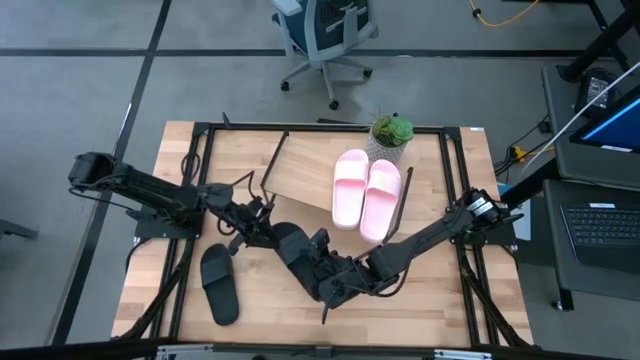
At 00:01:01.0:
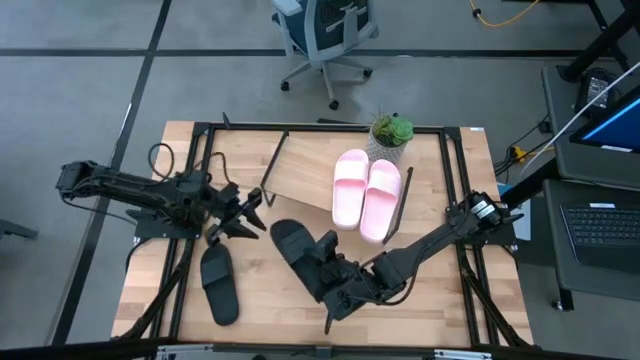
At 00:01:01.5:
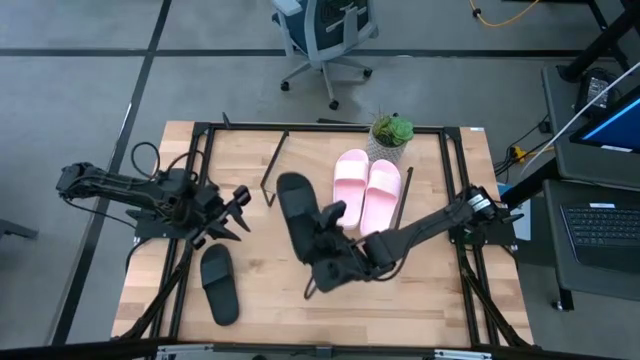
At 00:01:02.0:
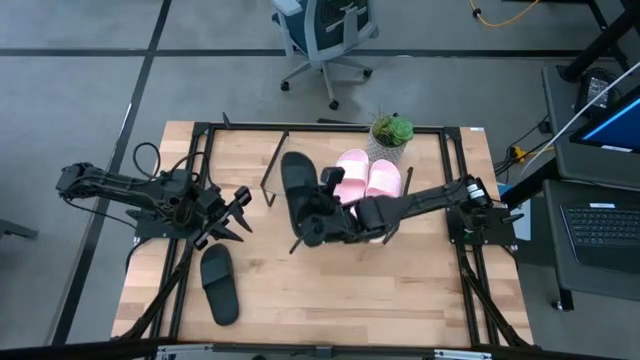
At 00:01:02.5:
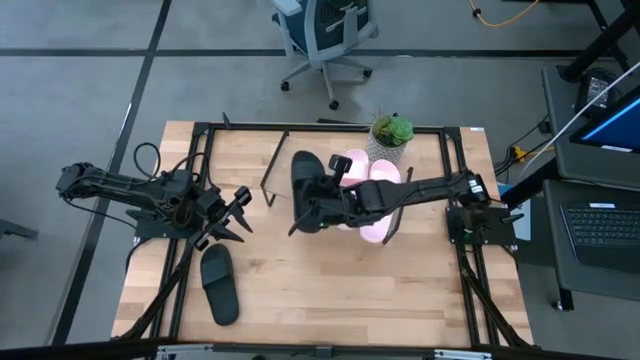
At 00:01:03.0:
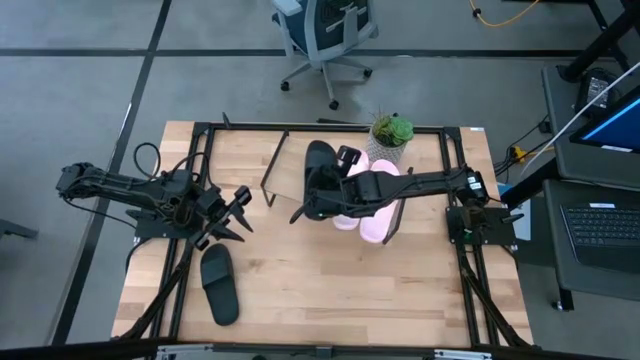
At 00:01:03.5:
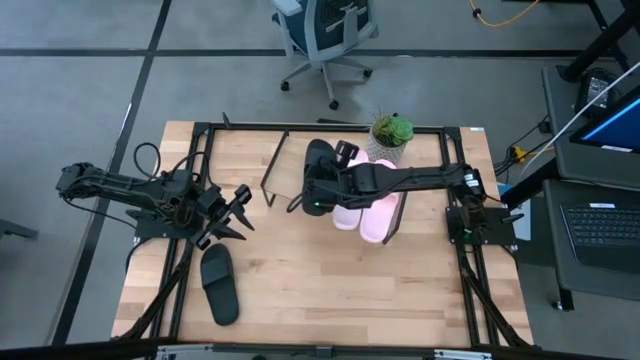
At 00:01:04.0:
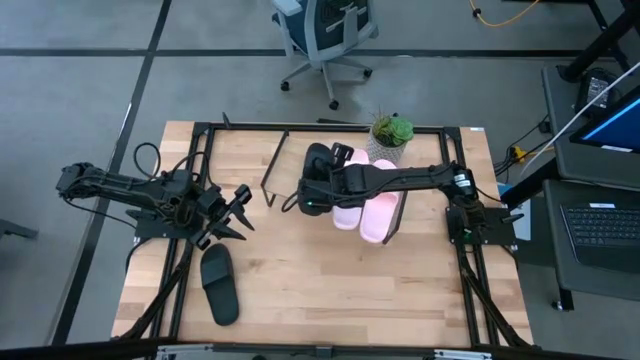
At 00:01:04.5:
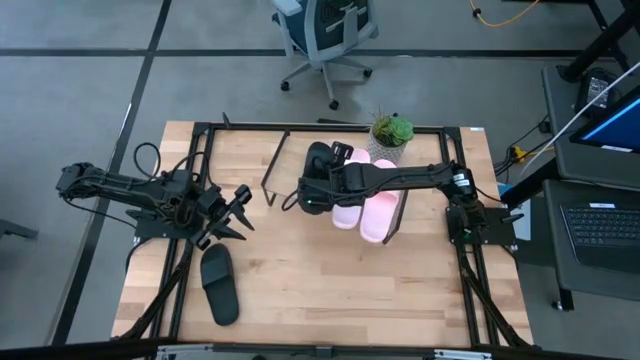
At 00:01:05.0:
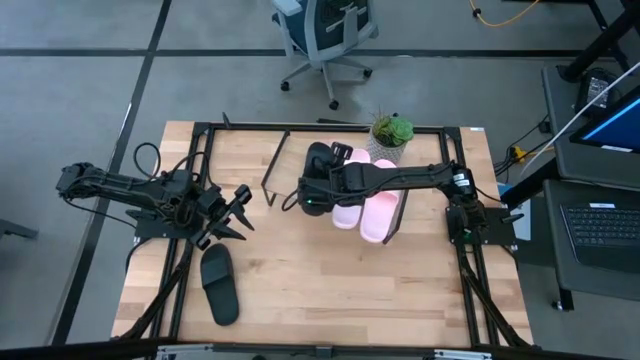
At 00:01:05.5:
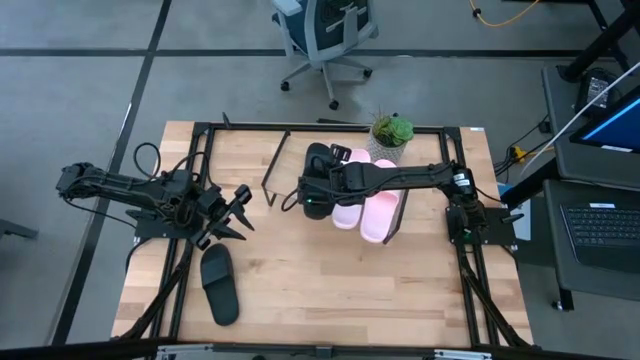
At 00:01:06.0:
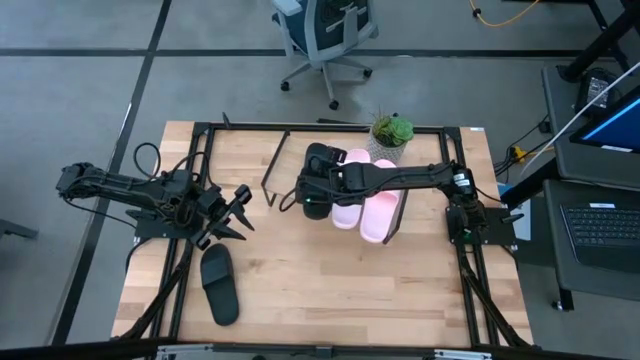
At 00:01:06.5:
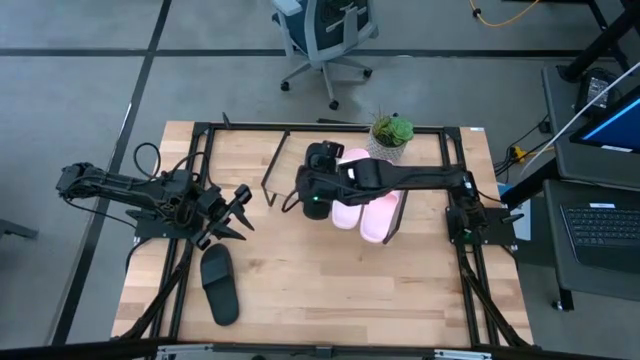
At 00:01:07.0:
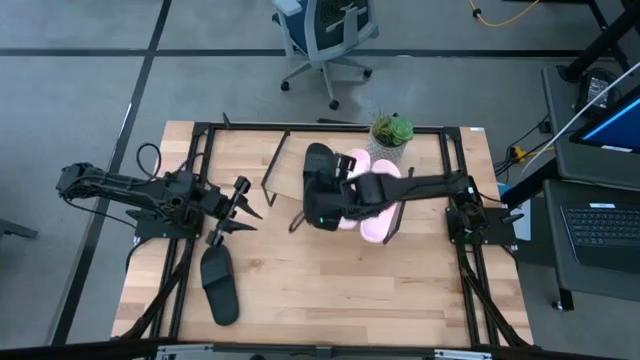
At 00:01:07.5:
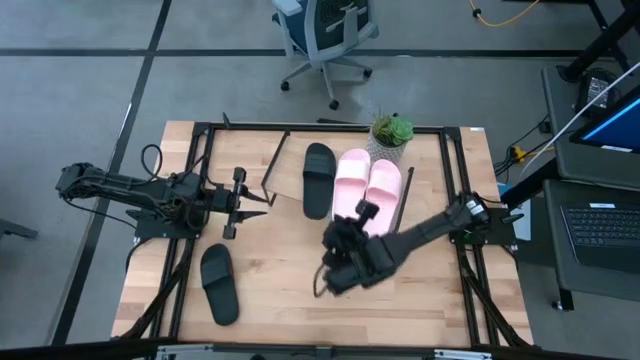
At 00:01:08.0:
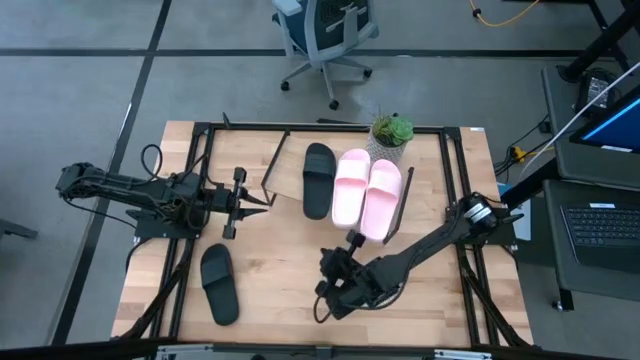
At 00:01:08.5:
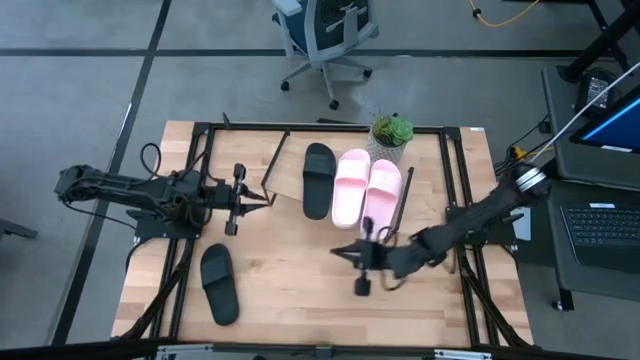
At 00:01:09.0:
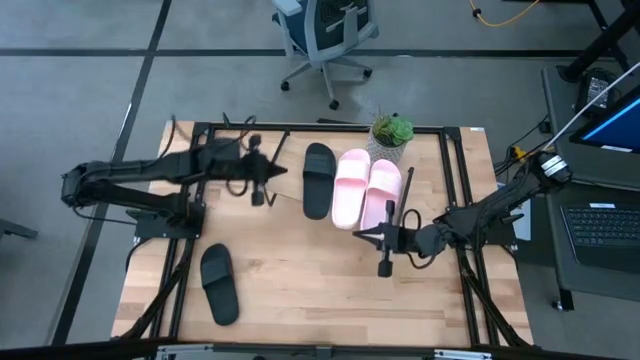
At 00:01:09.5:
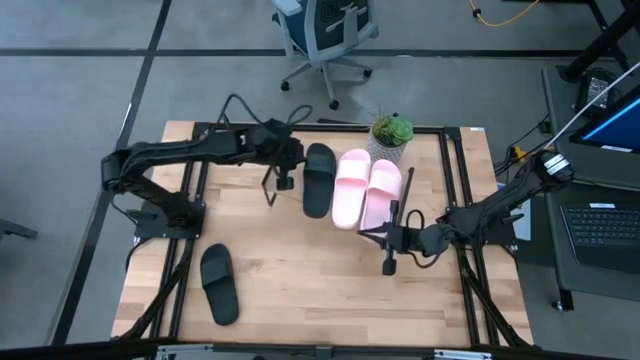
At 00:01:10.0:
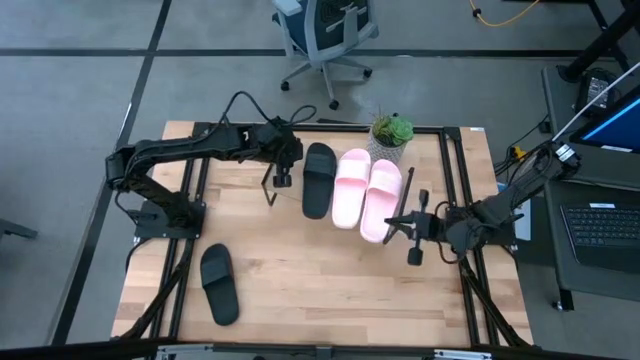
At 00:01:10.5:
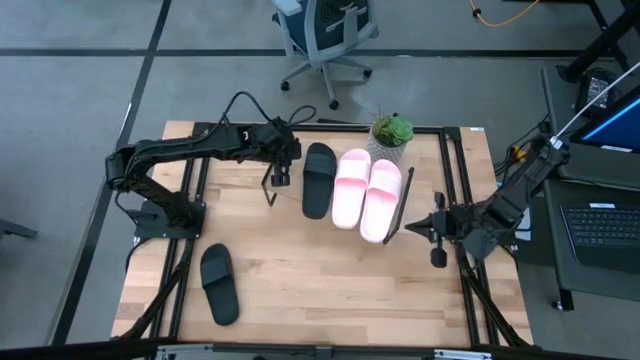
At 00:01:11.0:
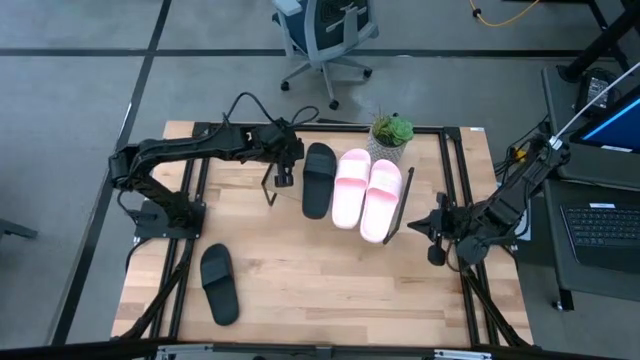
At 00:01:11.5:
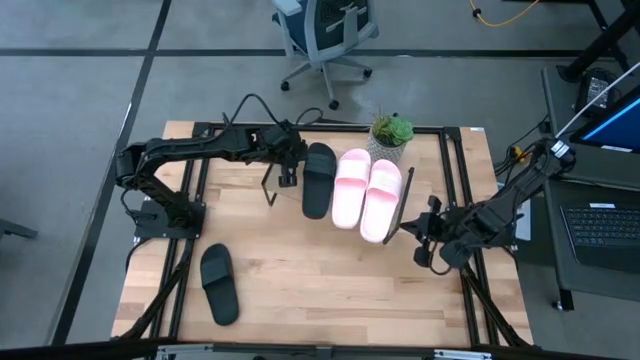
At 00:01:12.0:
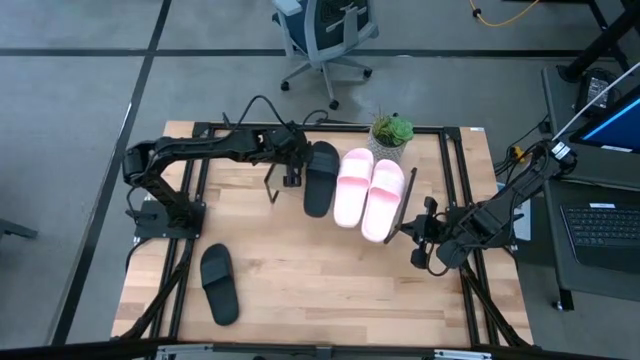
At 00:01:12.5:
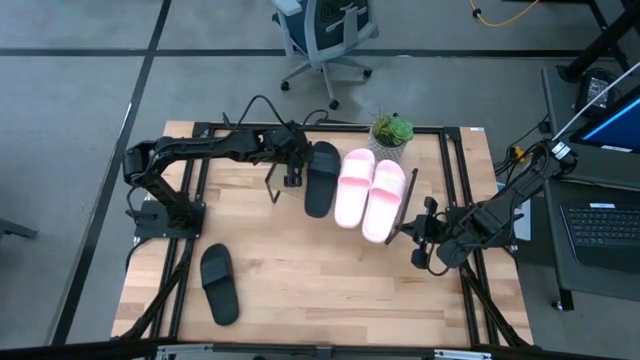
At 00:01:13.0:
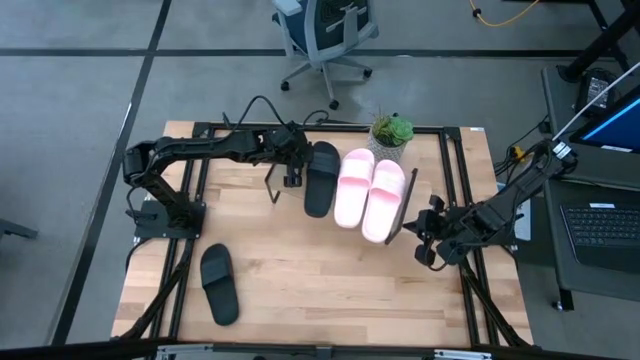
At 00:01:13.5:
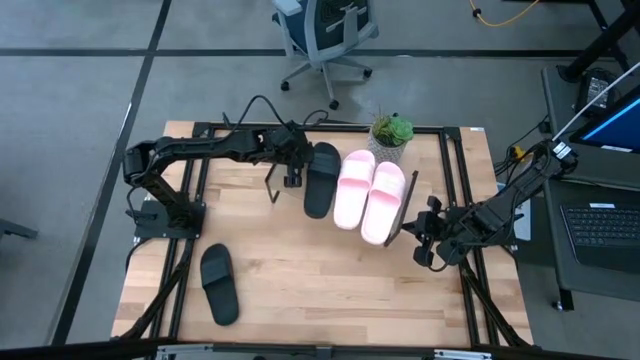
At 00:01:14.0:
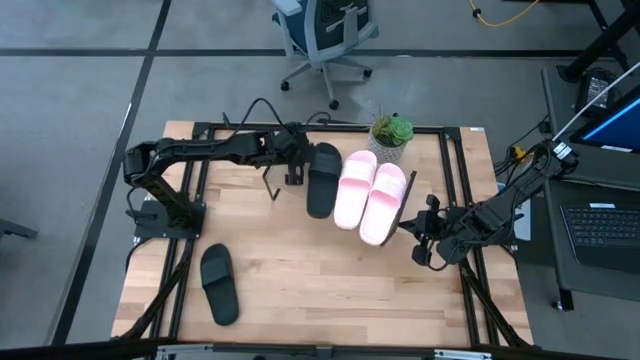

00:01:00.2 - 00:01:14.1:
Task: Pick and place slides into the shelf
Put the right black slide on the shelf

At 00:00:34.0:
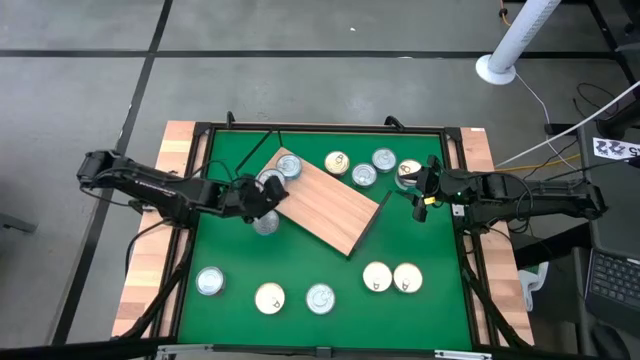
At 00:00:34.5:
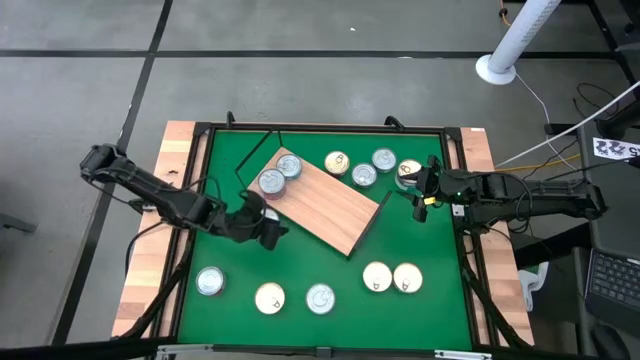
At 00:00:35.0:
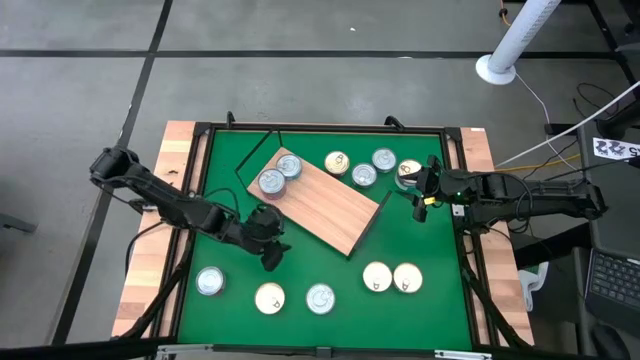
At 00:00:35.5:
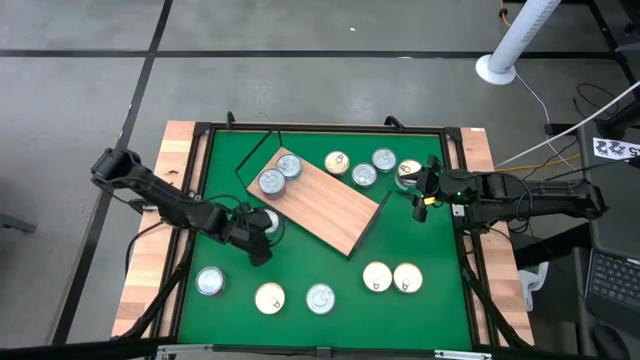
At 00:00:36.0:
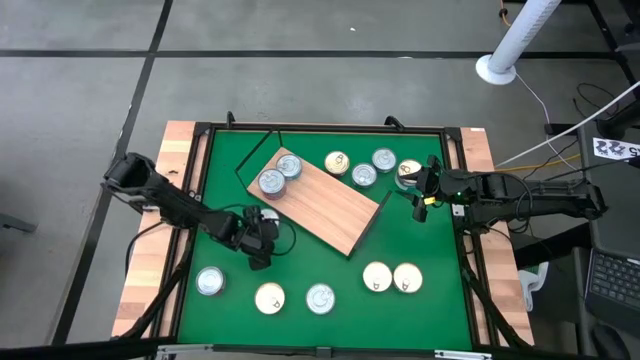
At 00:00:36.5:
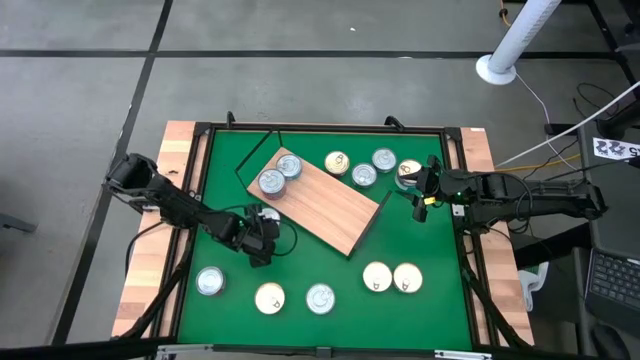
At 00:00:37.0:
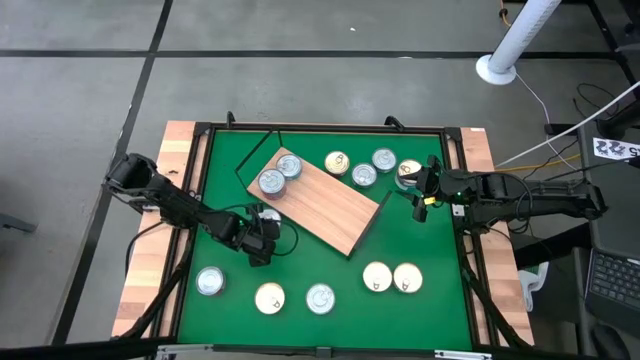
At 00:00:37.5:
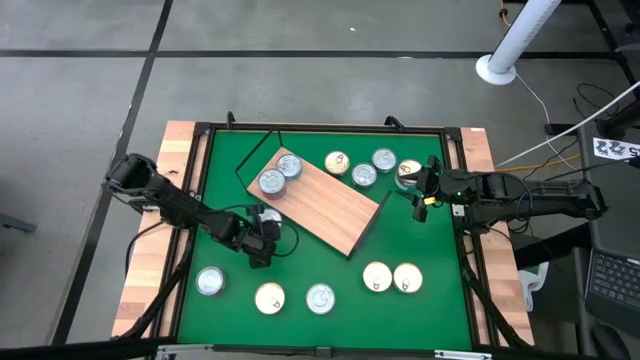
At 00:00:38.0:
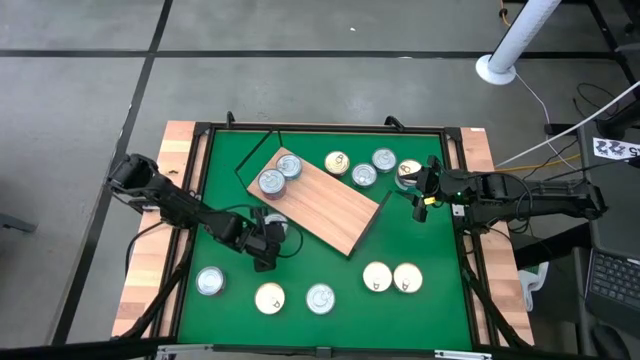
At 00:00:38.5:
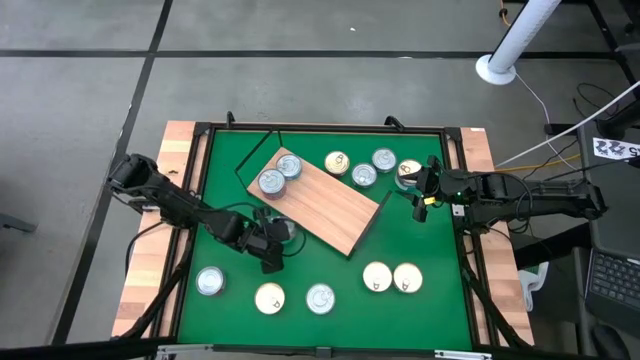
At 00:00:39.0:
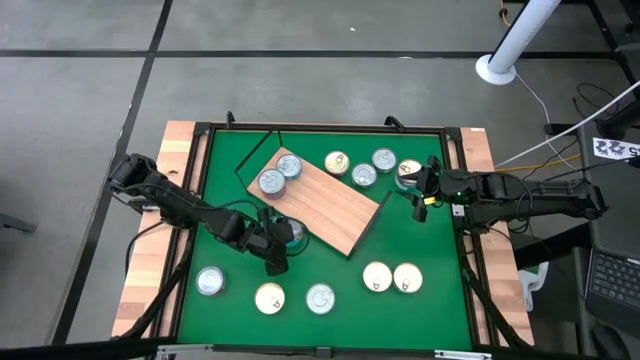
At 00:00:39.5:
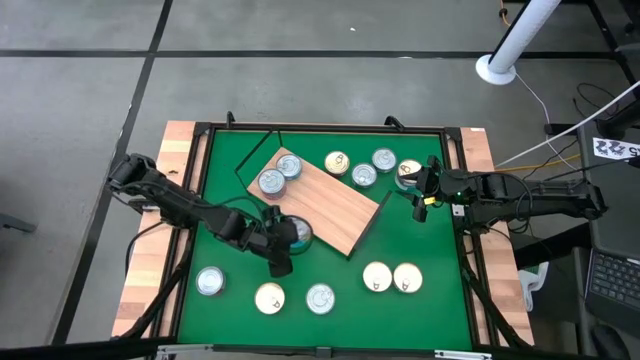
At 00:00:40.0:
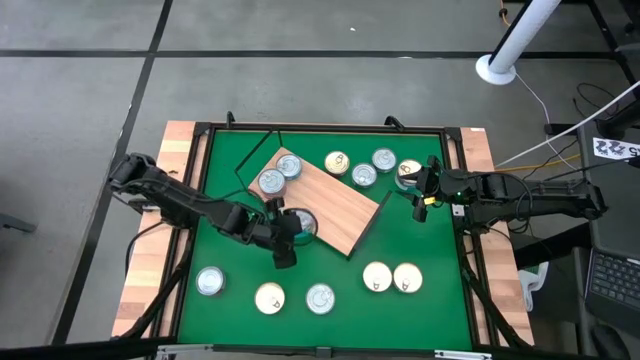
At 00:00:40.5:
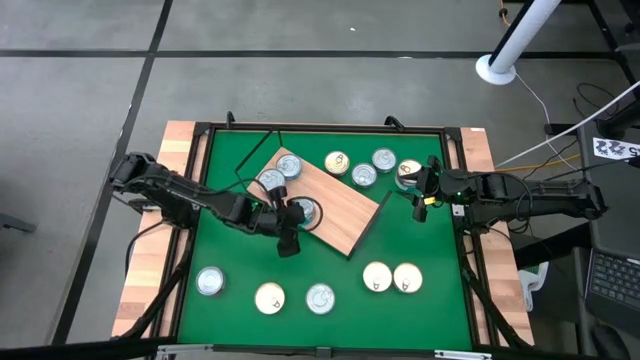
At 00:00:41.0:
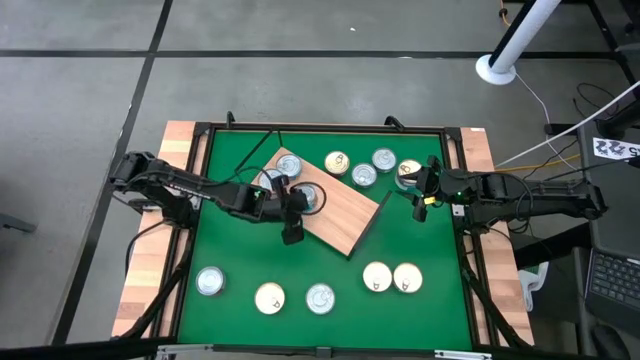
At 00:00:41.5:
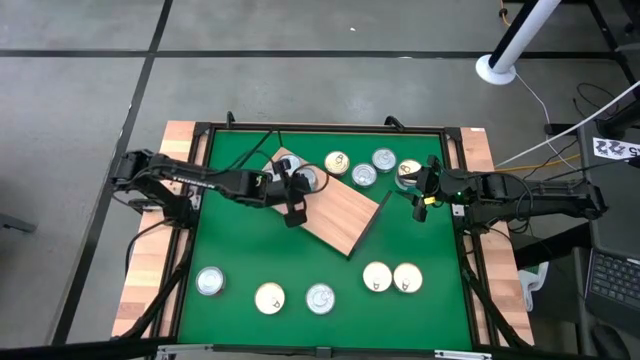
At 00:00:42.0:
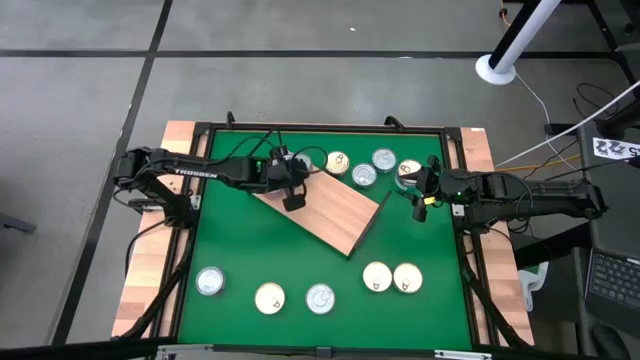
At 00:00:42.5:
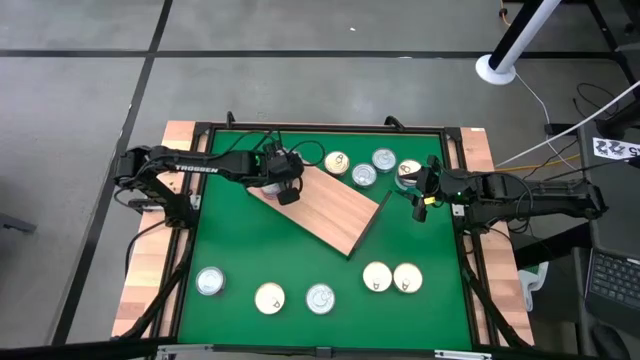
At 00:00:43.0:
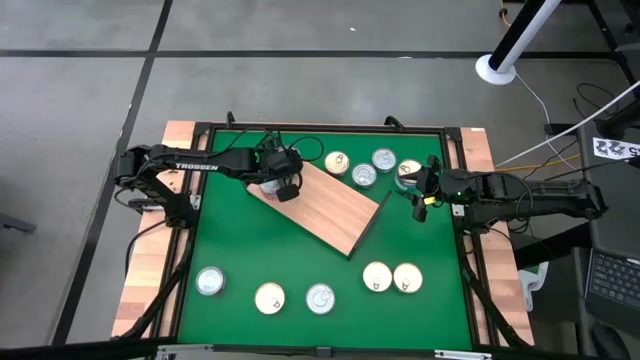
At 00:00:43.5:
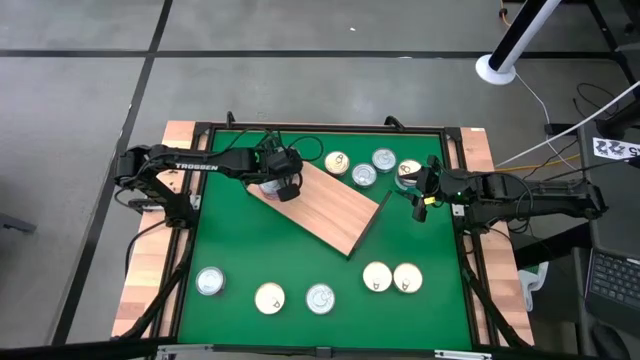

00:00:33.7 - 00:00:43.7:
Task: Stack canned seafood by type on shelf
Stack the yellow and blue tuna can on top of the yellow and blue tuna can on the shelf
